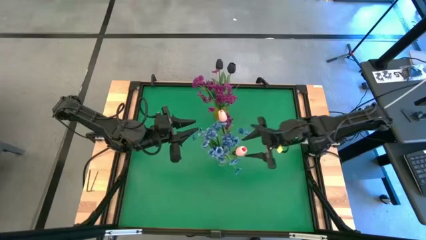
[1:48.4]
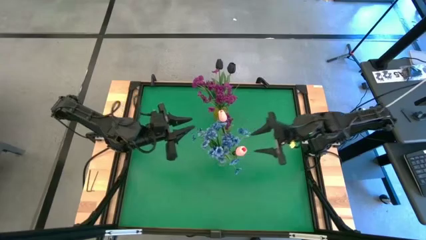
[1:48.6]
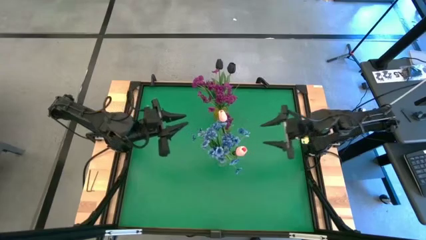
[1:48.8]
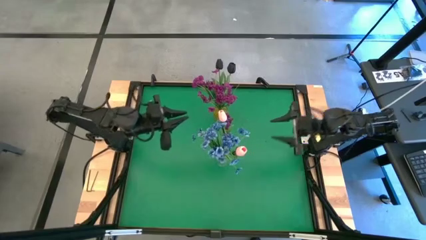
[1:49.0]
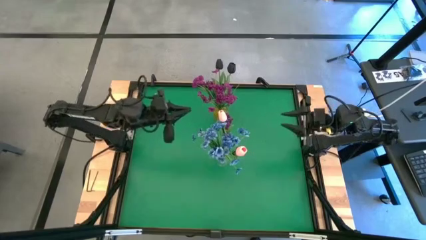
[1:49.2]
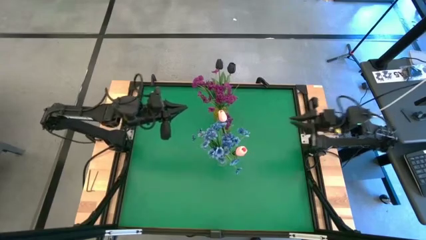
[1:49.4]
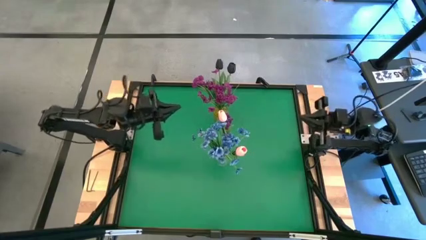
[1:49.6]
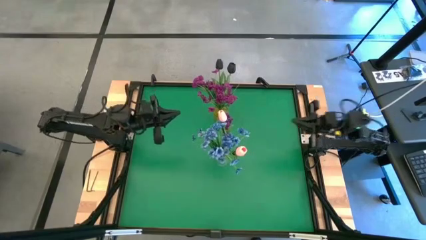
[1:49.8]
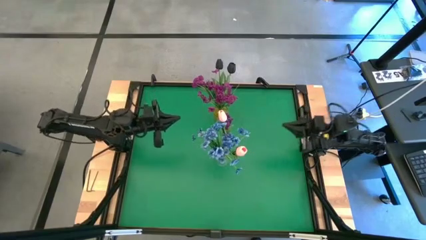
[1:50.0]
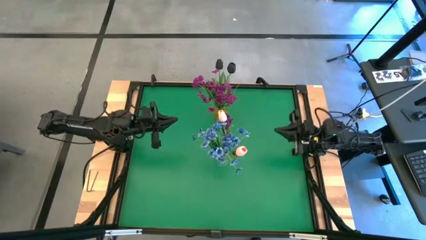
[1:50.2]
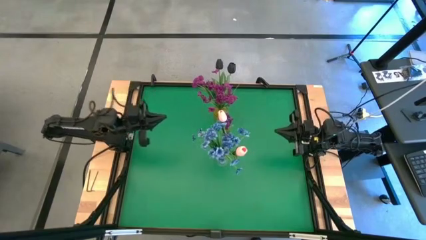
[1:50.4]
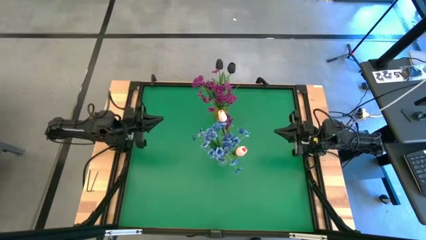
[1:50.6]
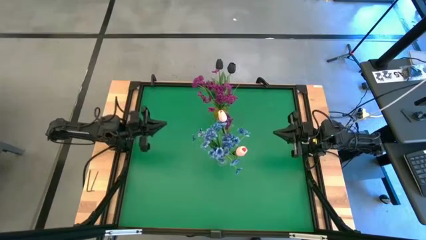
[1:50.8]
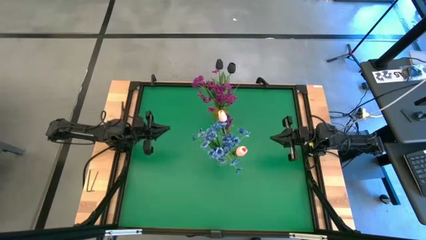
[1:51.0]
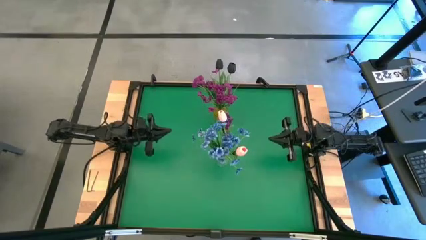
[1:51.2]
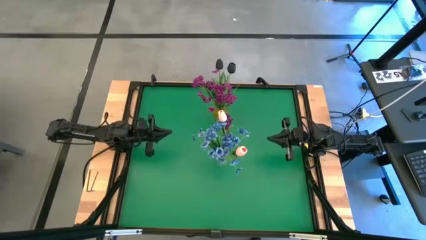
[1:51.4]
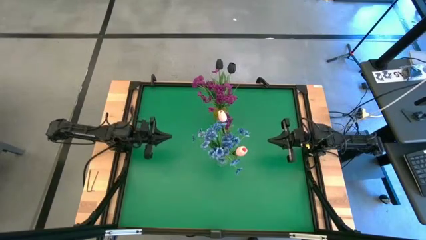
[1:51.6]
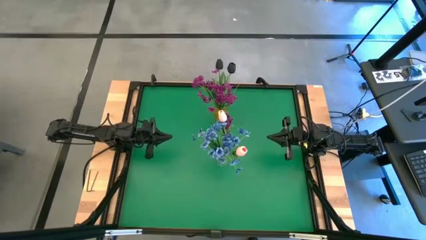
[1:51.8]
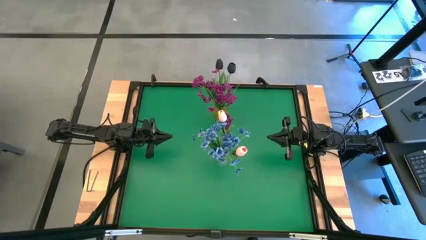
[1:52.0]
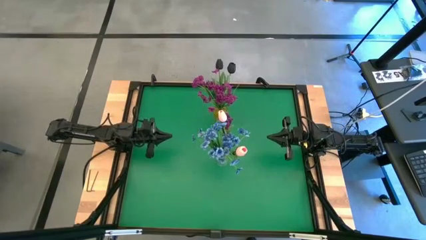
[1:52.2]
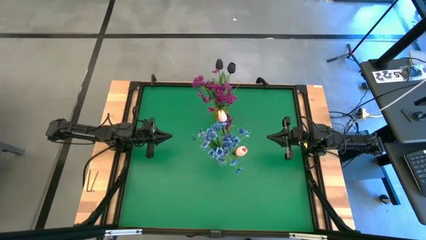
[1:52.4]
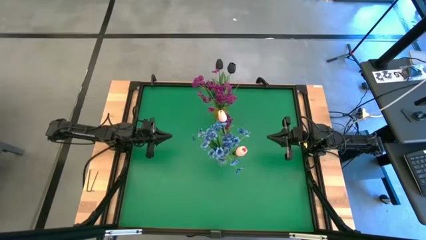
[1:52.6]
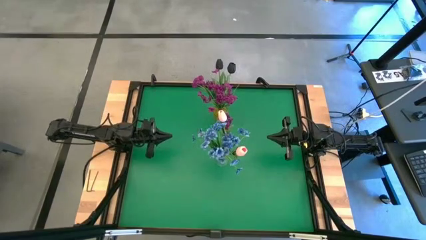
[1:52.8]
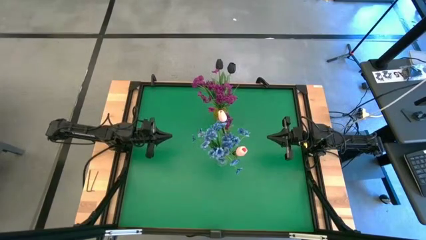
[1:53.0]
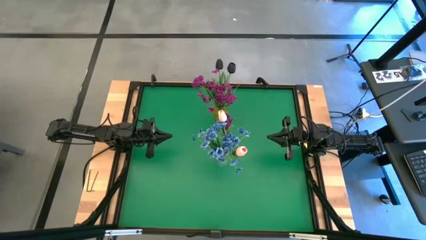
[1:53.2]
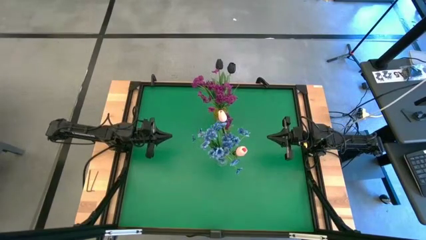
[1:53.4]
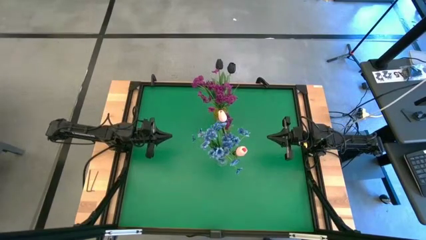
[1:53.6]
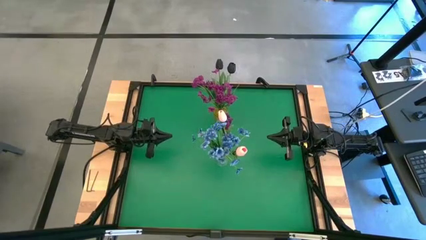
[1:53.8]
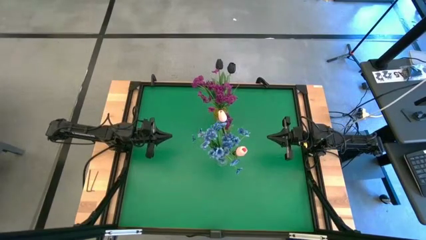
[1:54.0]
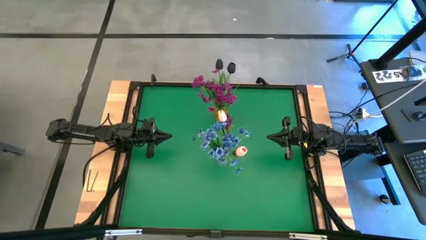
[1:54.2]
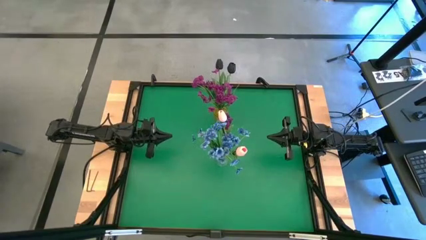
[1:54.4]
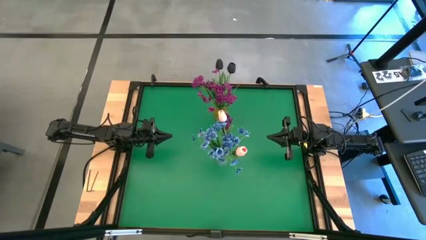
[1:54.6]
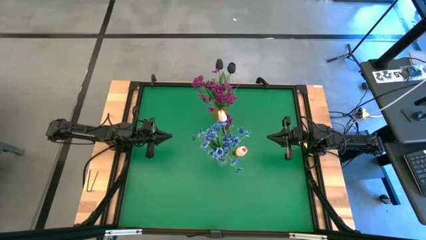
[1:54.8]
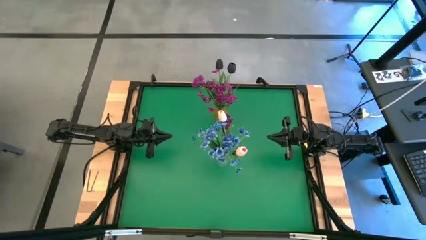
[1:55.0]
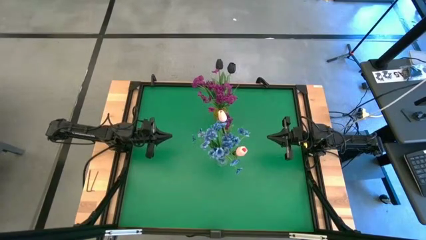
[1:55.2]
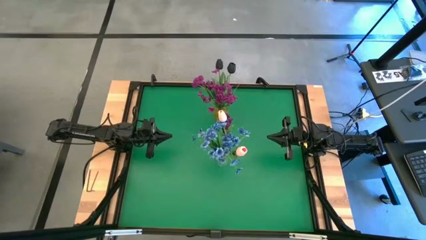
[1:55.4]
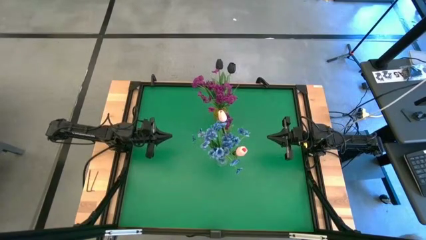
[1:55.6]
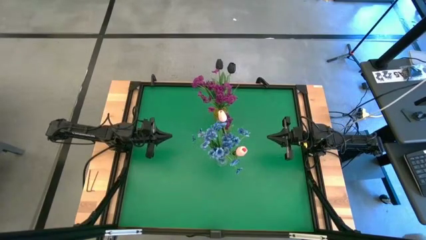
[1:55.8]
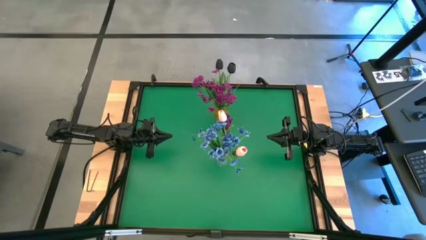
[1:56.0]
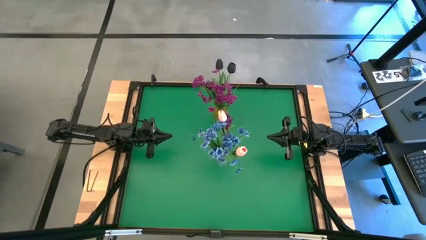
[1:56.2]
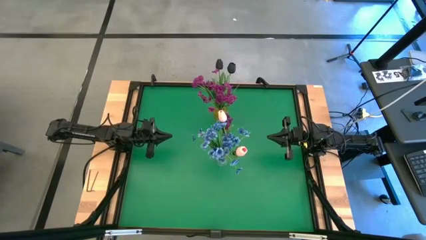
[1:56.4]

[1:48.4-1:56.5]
Task: Sort flowers into vase by color
Return to Home Position

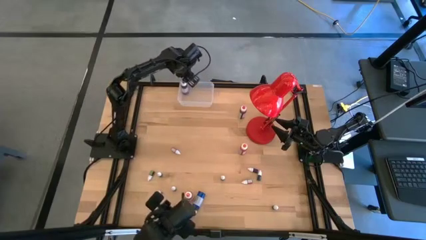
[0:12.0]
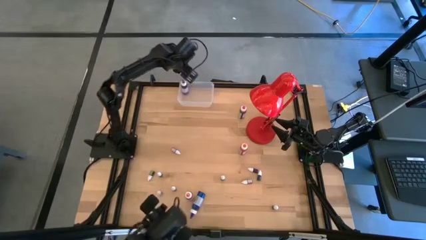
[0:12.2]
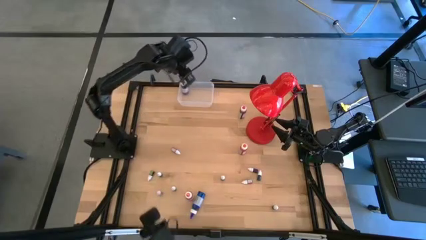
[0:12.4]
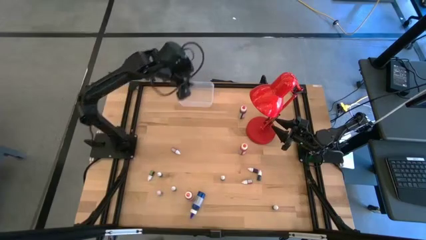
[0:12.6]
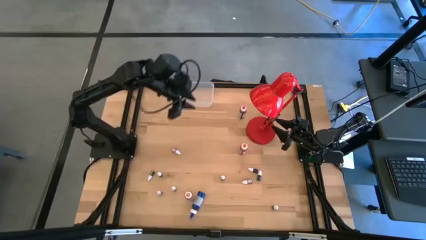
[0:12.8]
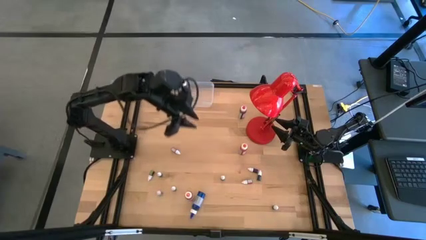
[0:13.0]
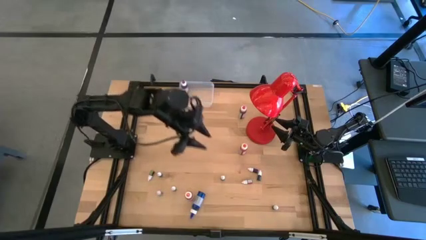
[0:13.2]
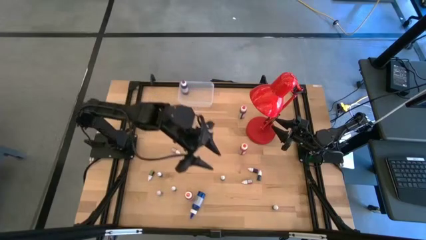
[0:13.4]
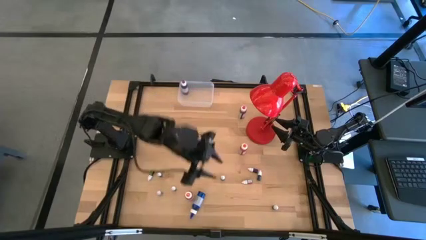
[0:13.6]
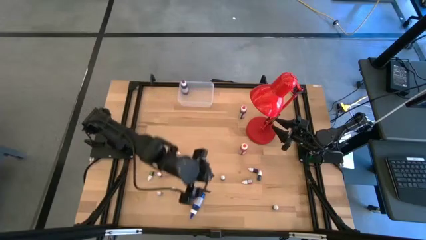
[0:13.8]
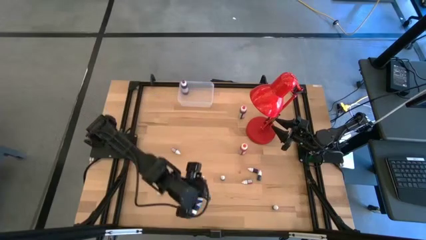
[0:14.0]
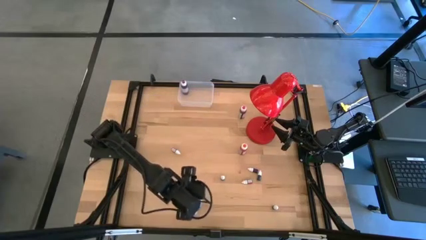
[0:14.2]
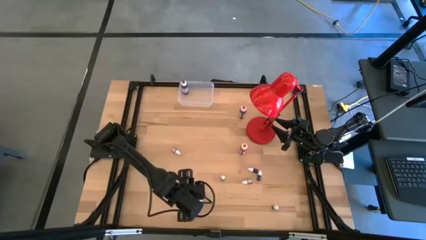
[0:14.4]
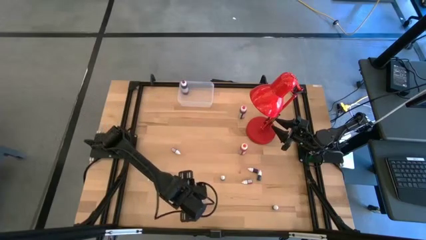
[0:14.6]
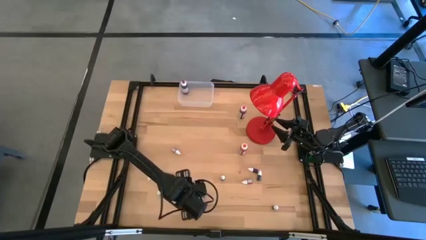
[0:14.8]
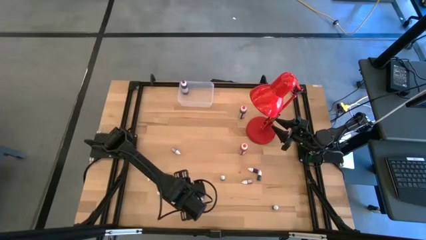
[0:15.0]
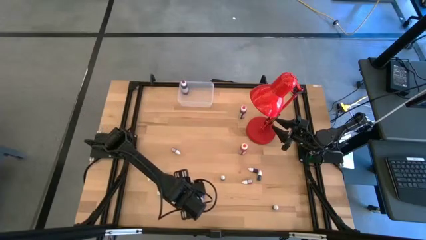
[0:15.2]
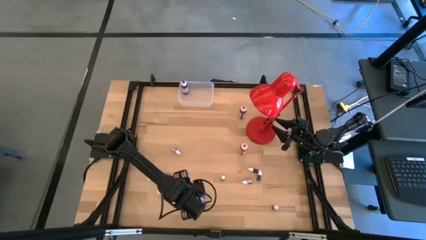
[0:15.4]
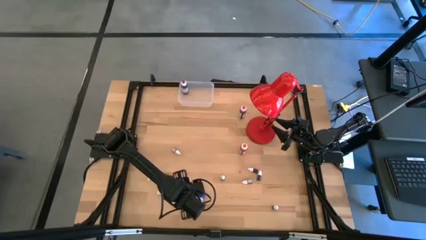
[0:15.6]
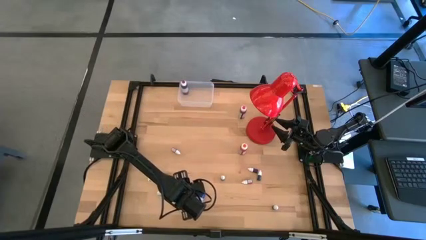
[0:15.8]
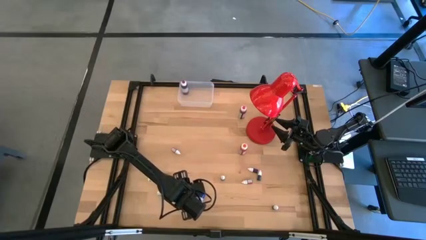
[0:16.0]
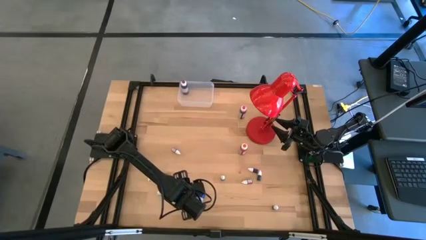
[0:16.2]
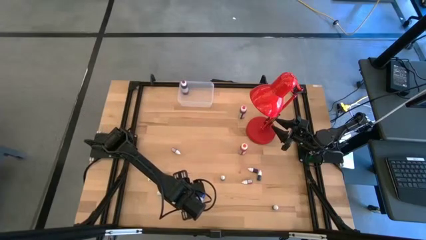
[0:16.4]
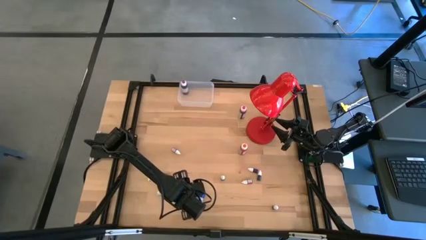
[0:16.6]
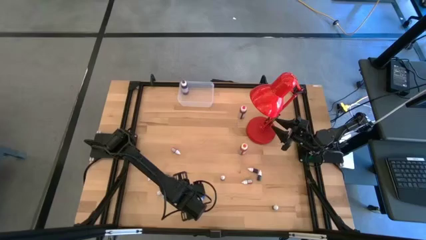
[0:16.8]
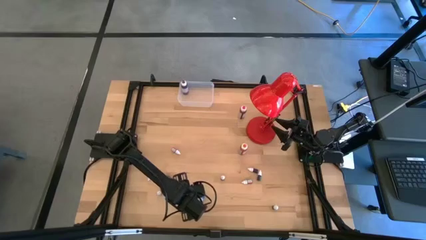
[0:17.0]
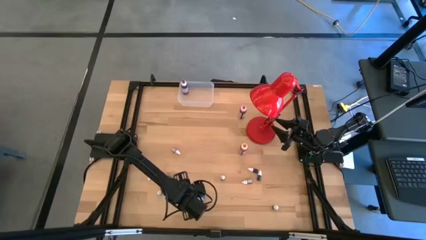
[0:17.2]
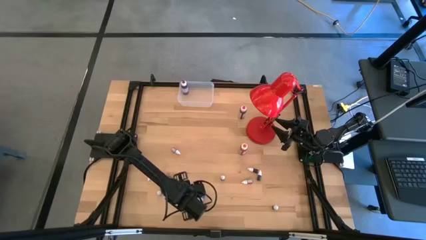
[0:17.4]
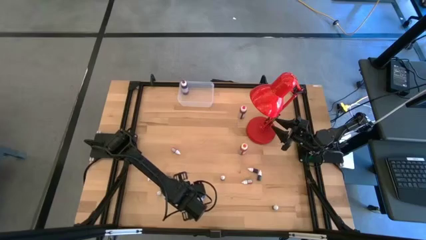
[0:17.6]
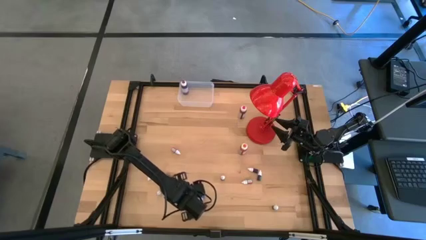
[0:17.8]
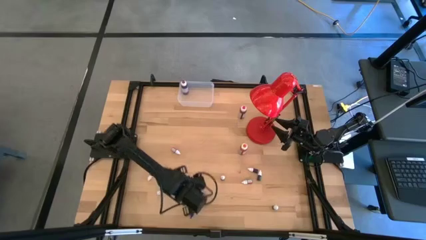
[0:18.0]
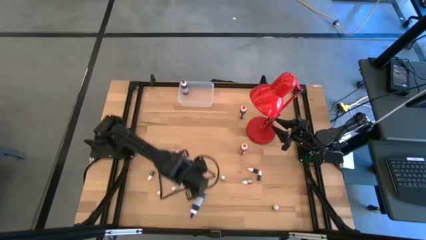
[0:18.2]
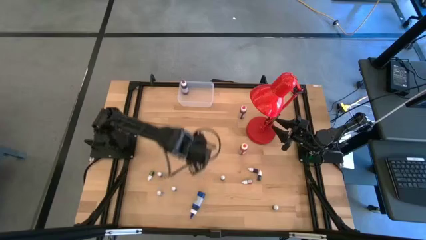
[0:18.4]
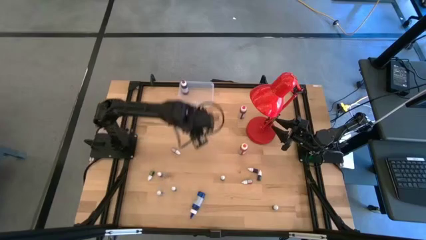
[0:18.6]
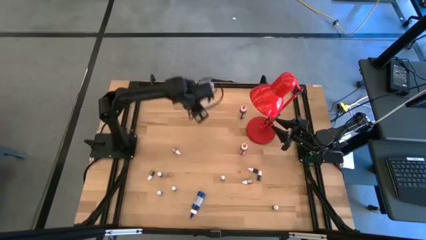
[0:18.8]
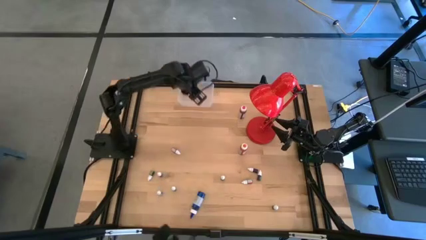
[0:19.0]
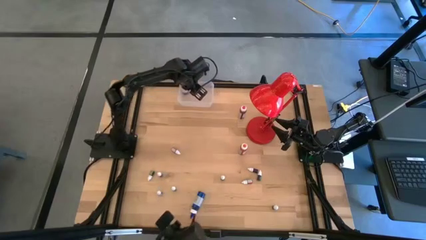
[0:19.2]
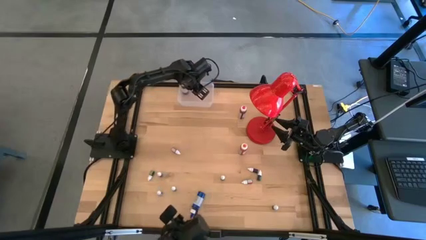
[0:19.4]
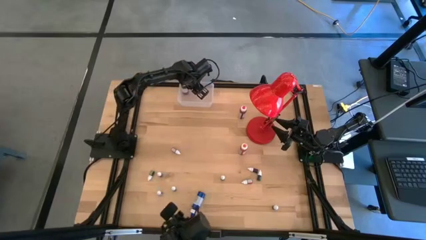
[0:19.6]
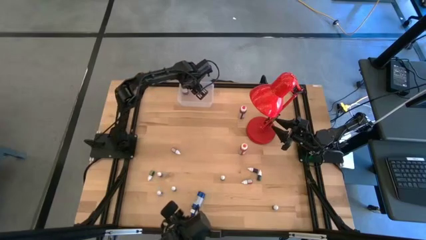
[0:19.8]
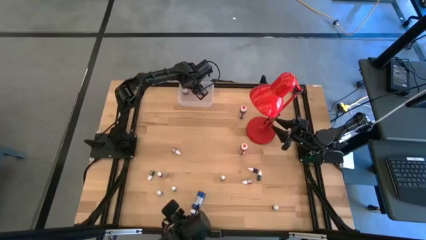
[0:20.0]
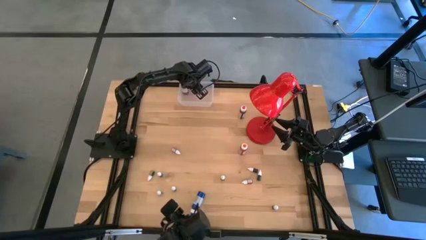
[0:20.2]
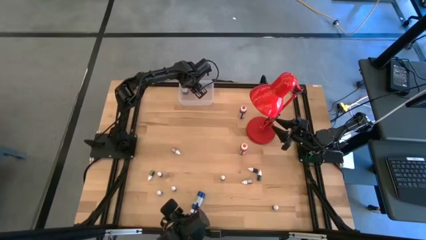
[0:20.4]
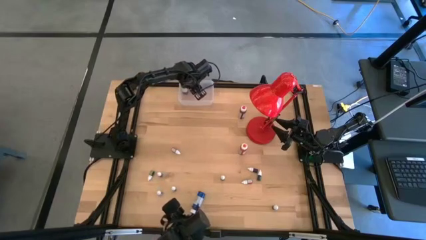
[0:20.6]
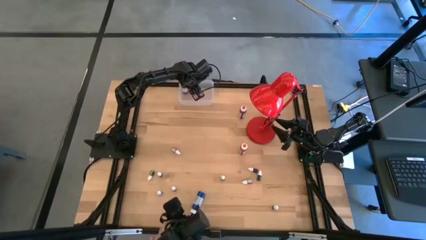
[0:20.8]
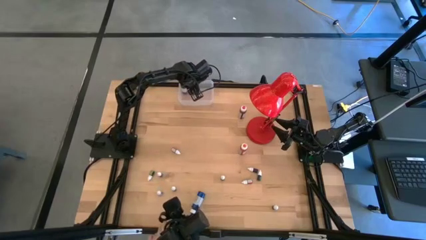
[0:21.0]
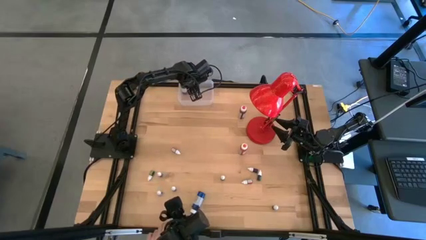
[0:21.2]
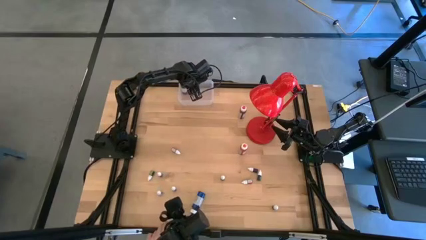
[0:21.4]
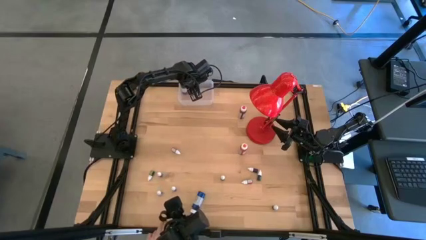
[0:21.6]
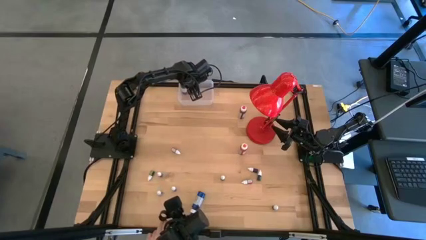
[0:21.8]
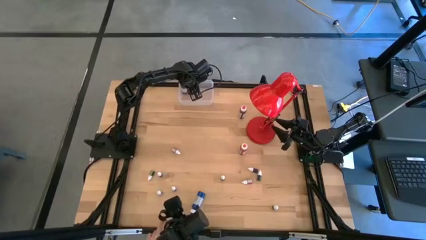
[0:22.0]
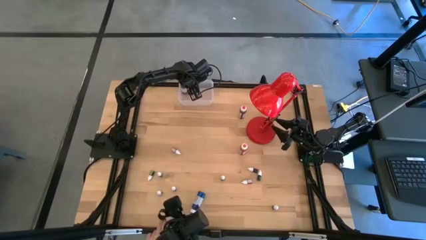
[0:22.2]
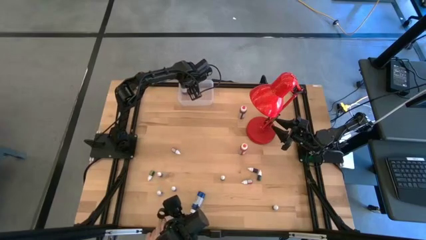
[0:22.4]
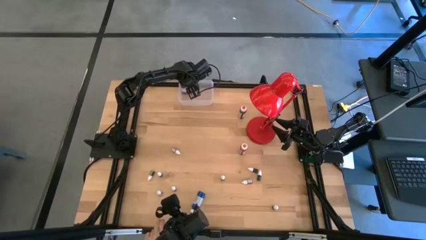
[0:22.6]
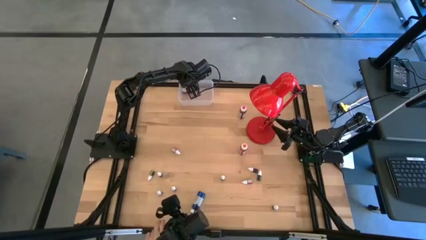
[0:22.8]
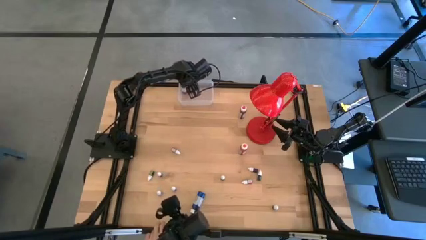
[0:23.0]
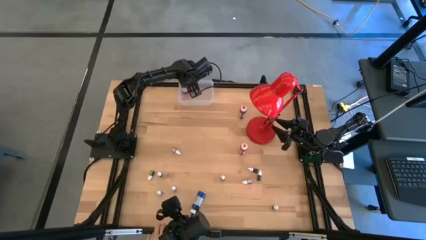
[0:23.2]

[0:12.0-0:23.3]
Task: Pick & Place food coloring
Put the bottom large orange food coloring bottle into the transparent bin
